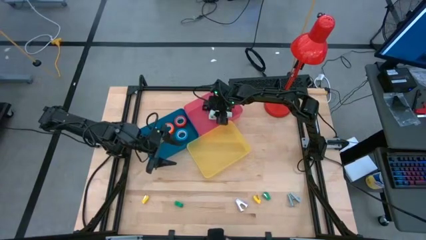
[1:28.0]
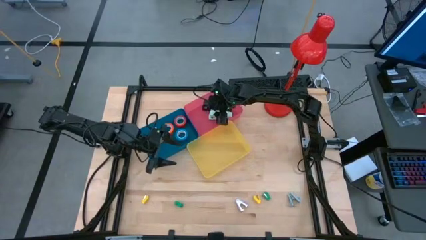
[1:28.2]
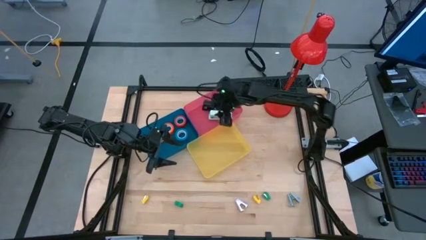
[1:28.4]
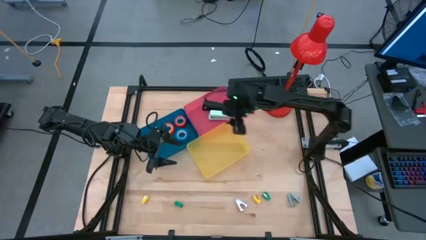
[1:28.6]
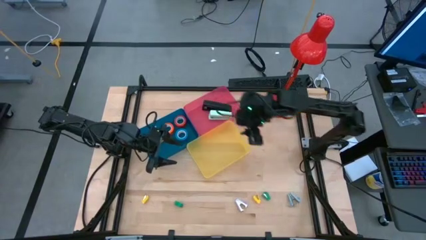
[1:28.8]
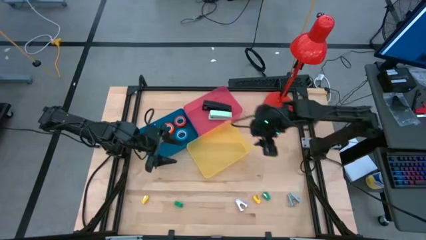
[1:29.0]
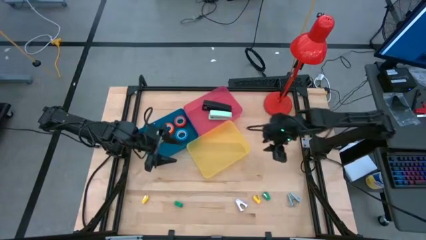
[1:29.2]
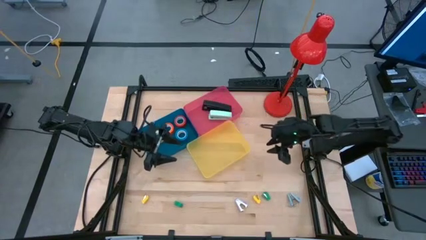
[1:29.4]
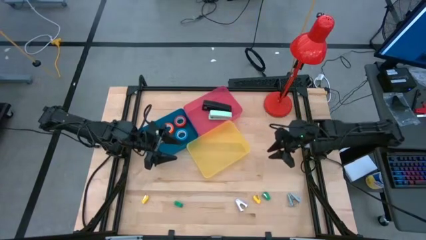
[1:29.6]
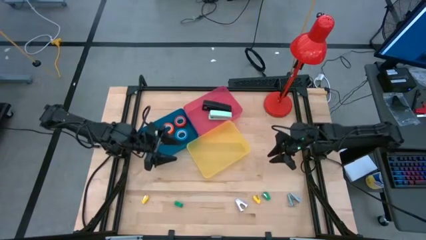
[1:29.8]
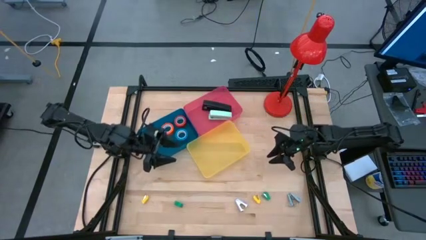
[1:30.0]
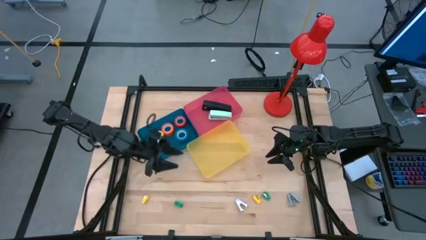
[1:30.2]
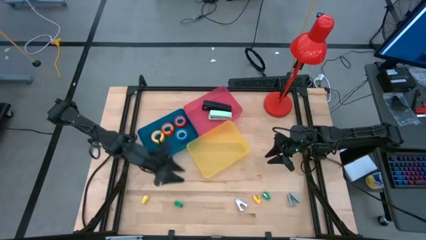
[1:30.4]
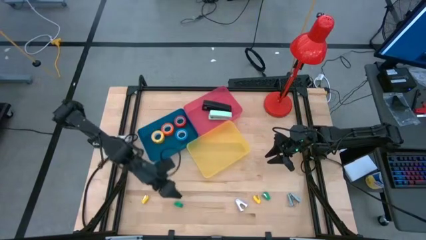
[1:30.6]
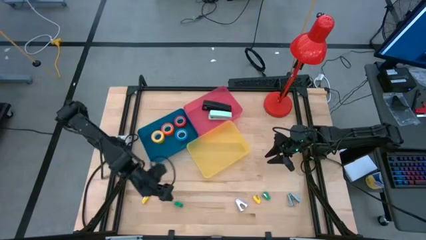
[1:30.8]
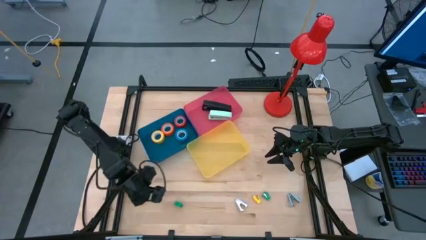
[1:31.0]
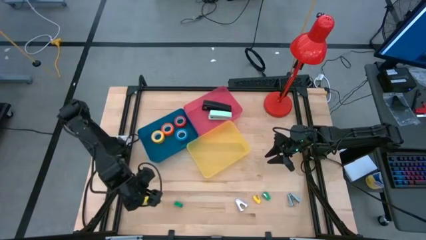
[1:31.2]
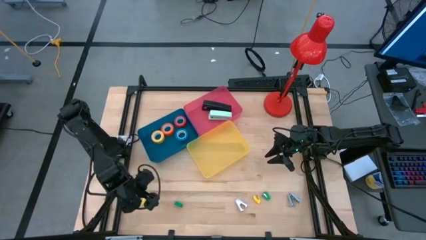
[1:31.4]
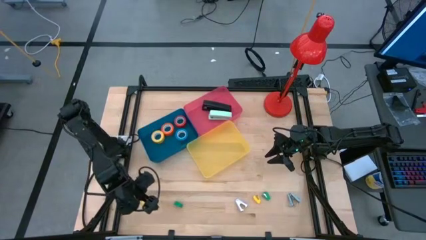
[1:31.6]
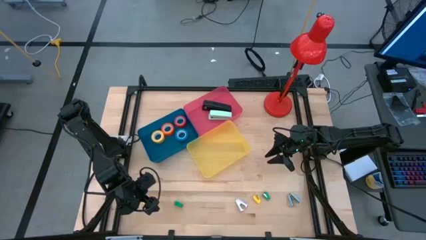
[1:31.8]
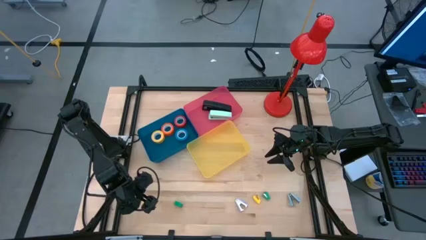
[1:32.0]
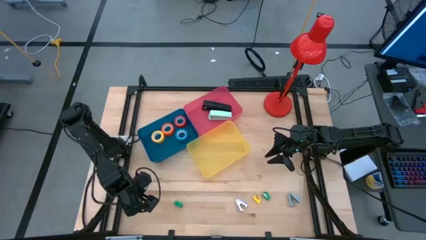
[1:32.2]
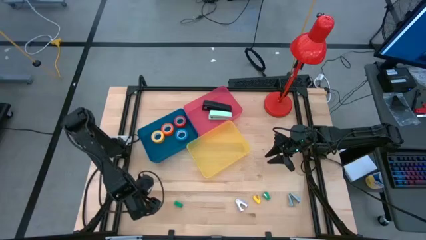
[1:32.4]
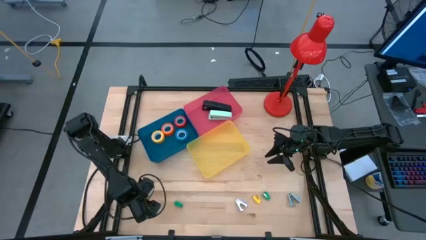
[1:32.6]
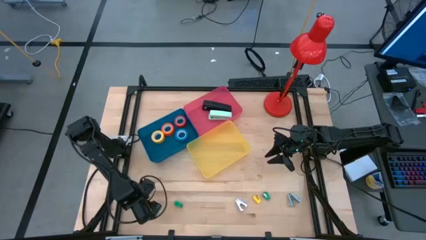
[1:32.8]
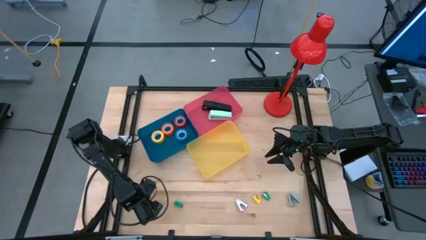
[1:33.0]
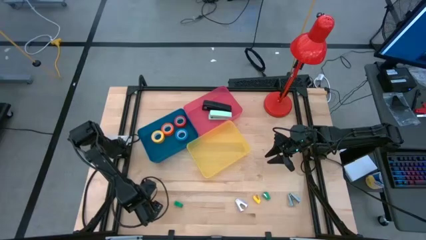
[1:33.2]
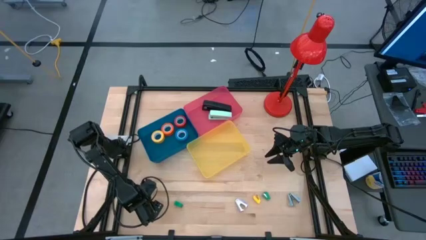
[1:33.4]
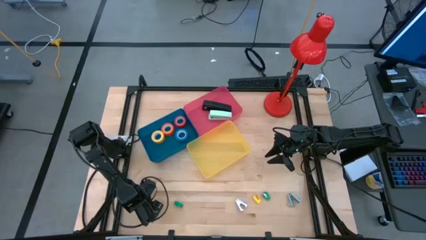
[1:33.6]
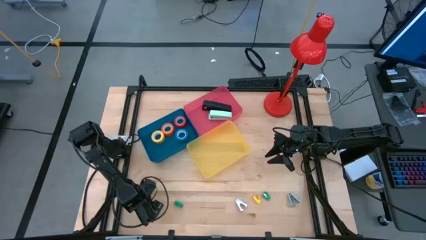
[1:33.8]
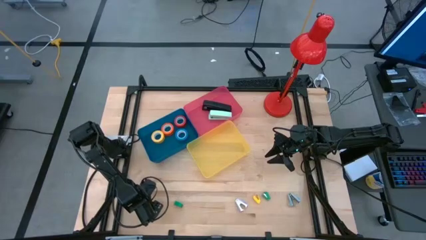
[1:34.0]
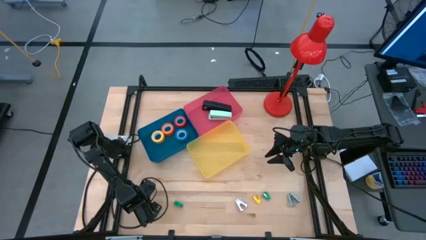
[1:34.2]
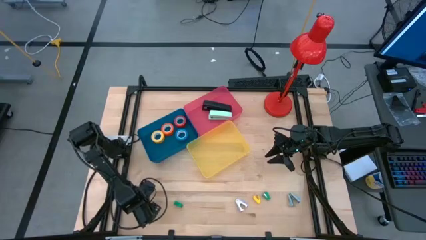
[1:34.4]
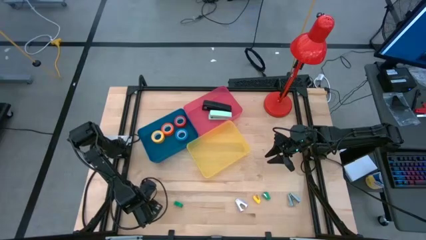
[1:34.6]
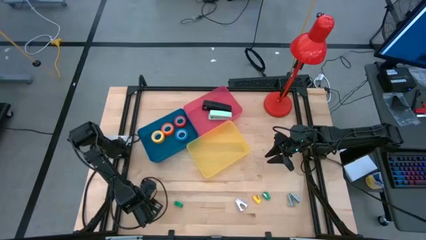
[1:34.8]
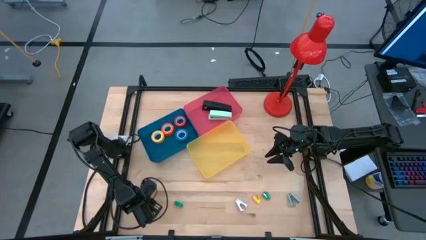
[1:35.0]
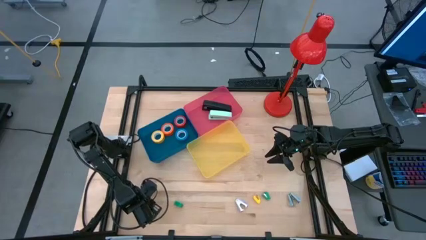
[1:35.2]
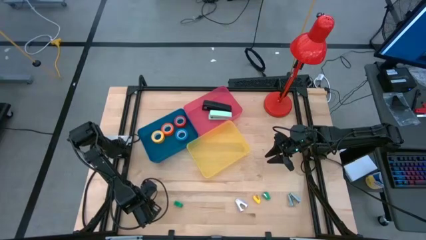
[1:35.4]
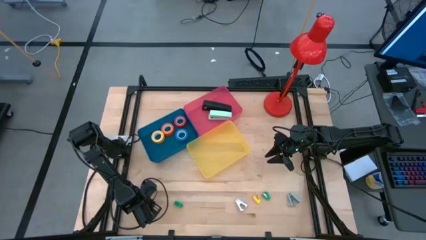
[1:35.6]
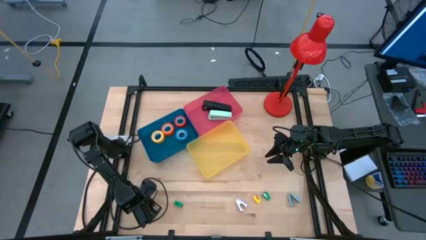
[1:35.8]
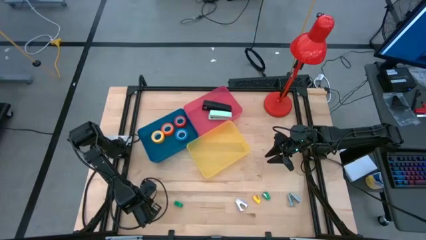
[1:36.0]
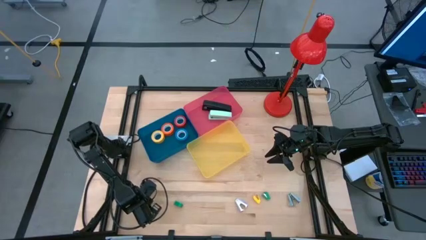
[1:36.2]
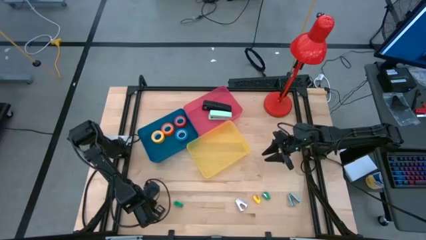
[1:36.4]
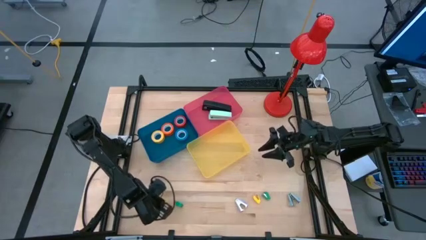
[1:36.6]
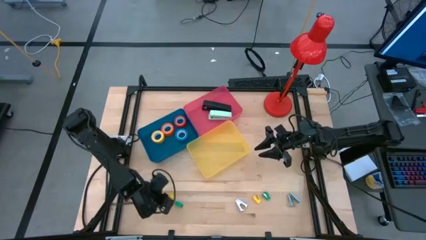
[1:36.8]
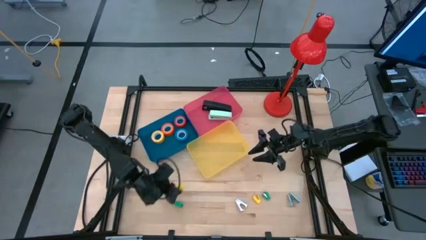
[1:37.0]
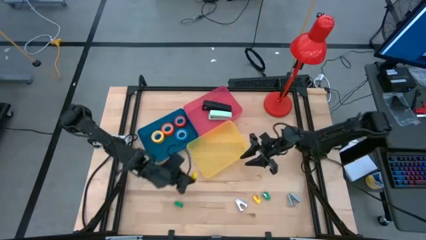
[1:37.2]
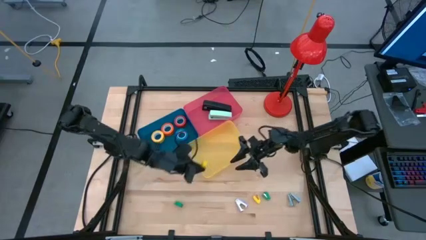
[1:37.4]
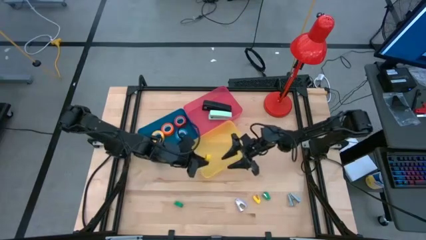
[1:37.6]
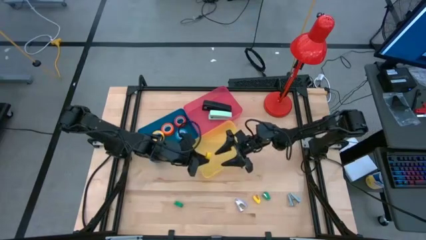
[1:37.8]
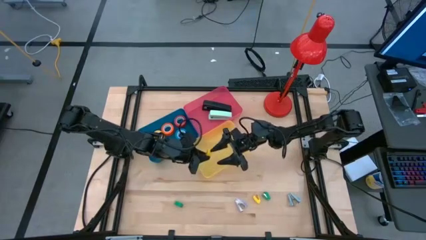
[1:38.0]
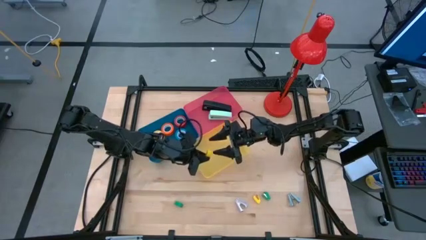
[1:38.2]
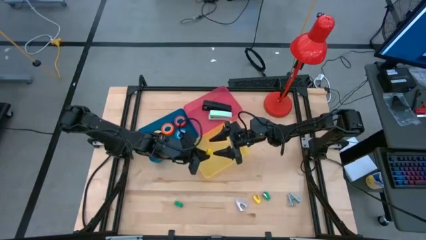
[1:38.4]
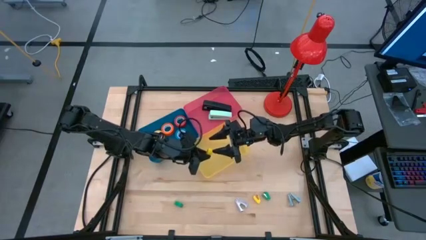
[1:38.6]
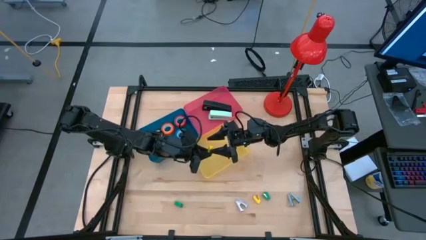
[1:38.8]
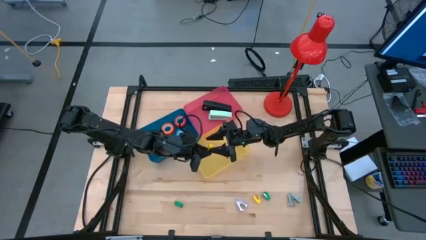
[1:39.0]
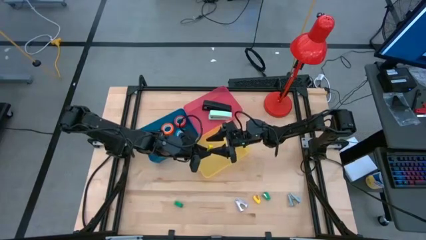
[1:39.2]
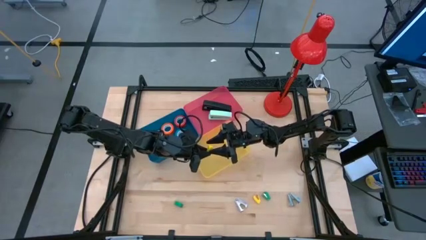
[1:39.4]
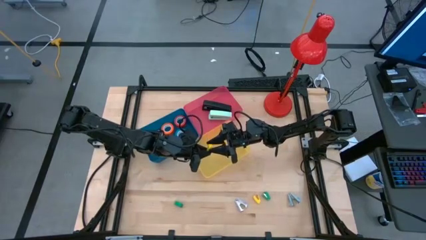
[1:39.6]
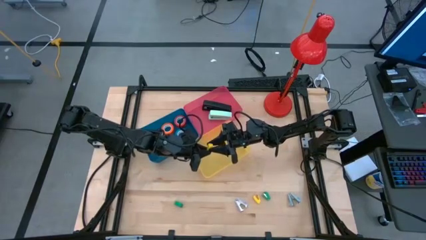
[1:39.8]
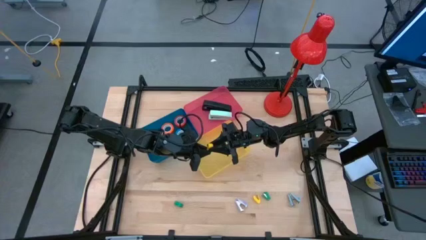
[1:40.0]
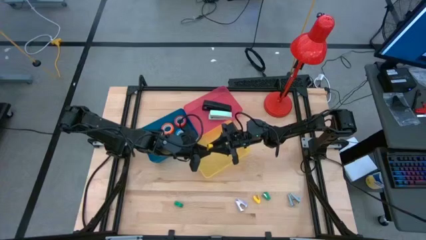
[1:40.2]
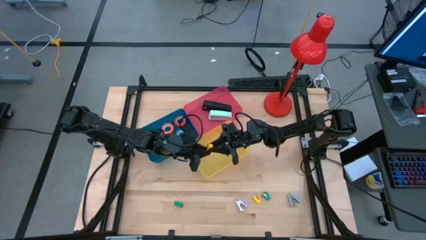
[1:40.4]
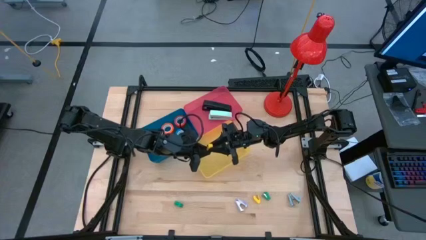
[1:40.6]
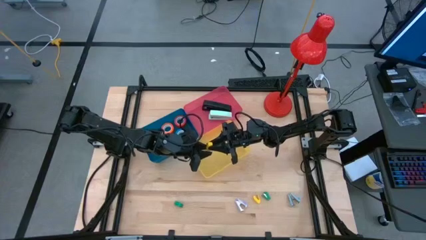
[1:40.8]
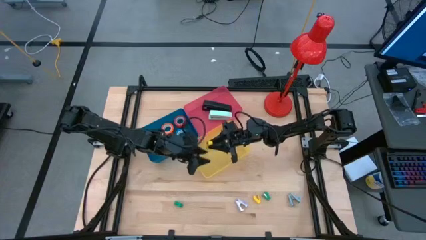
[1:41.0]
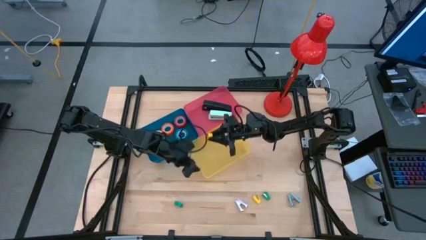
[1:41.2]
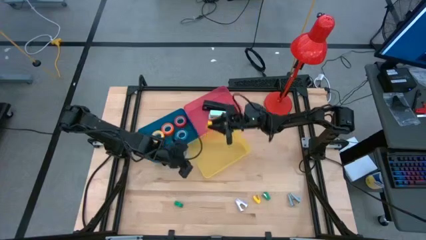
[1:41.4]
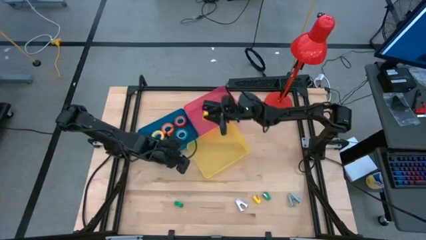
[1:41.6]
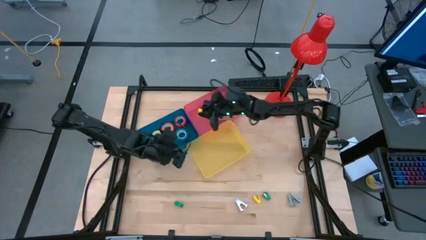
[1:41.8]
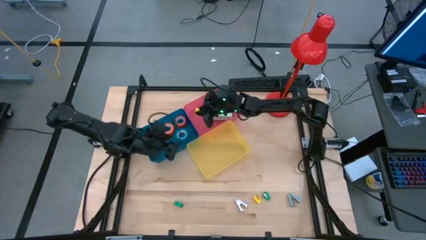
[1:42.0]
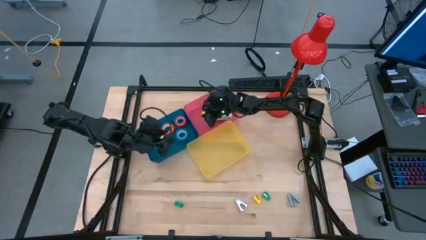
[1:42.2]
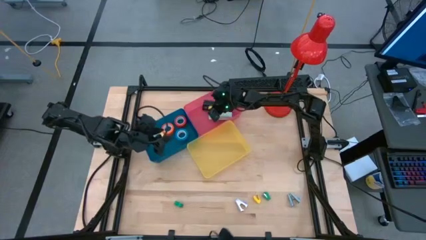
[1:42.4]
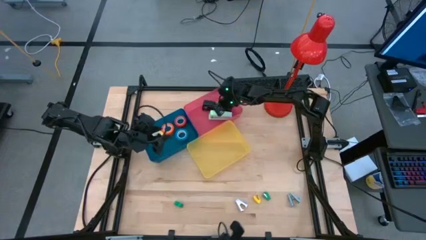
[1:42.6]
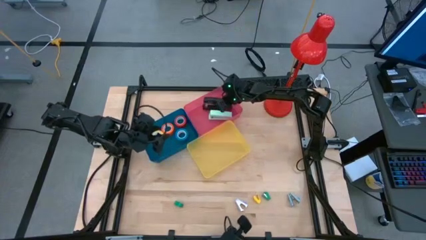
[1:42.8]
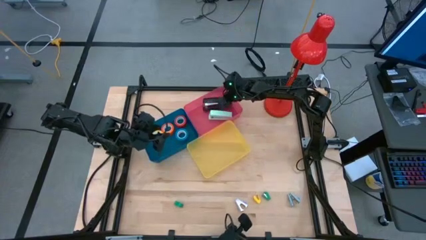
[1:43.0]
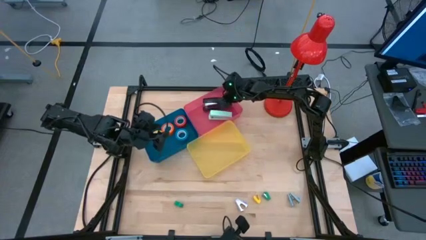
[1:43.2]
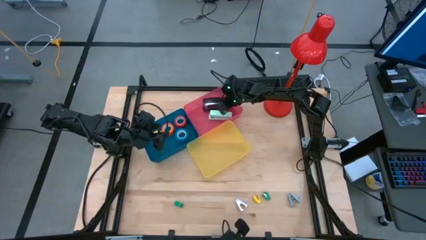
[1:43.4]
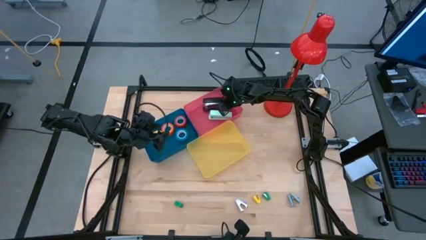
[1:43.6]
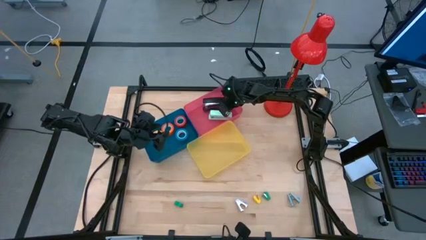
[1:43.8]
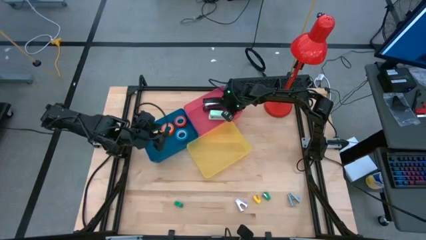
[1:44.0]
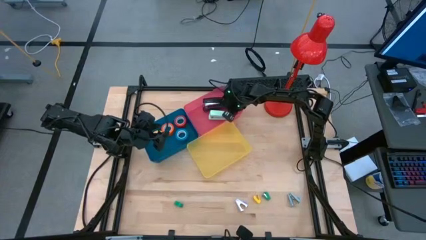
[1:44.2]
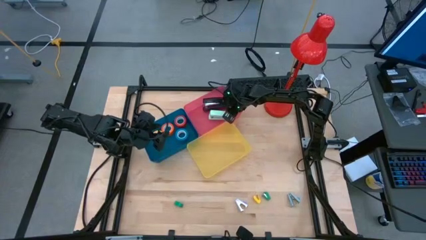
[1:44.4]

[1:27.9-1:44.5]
Task: Pick and place Stapler, Stapler remover, tape
Put the left yellow stapler into the pink bin

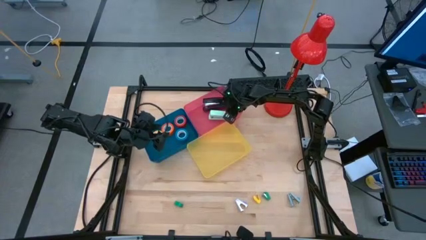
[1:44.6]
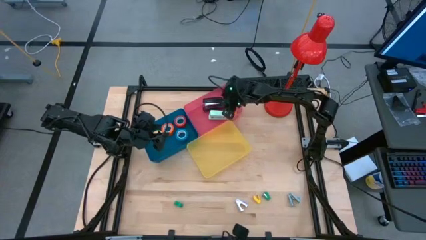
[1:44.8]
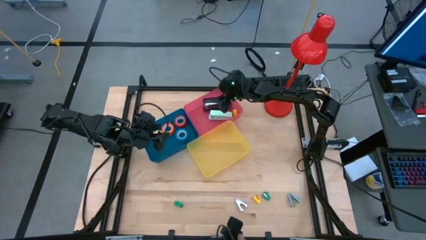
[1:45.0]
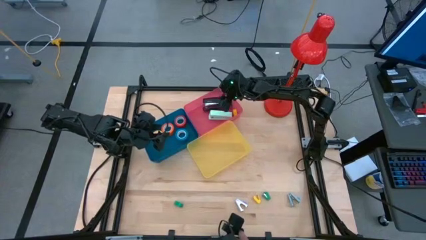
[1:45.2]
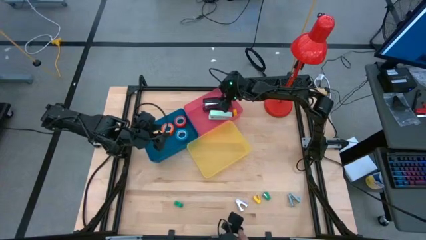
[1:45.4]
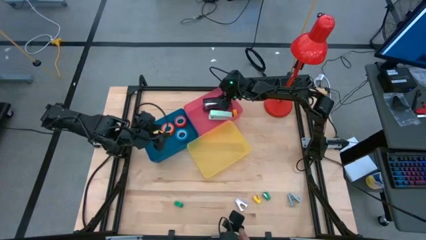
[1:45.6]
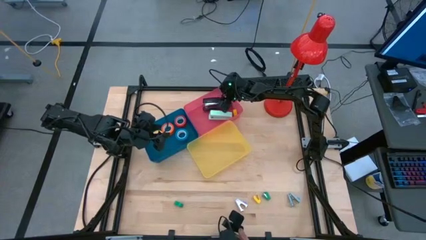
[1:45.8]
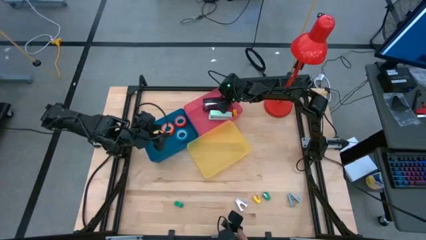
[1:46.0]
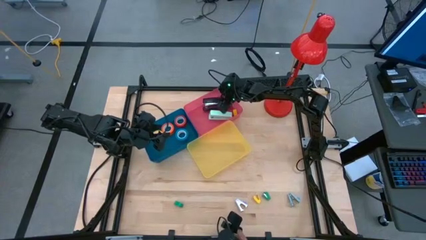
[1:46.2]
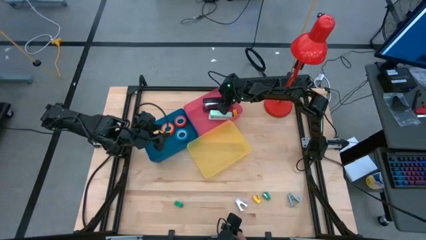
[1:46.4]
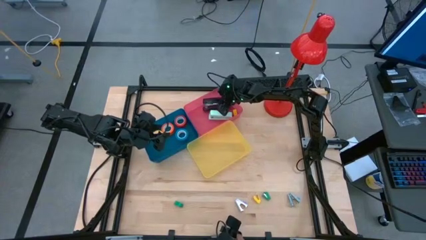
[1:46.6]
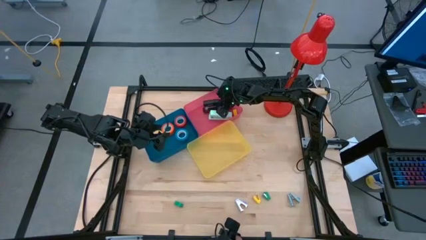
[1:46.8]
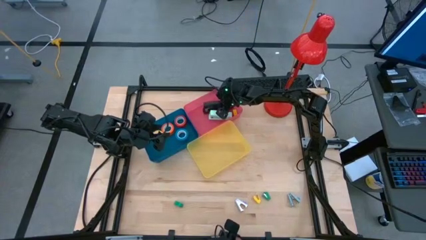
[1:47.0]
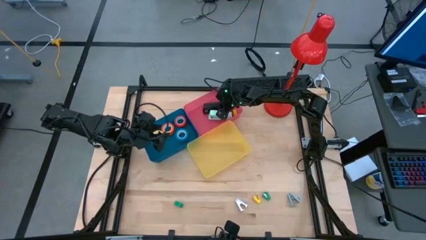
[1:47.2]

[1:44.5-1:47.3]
Adjust the black stapler in the bin
